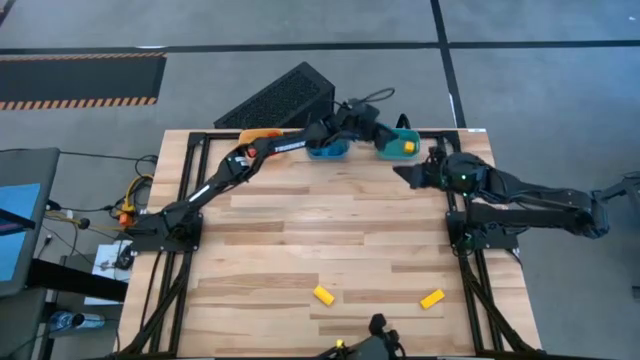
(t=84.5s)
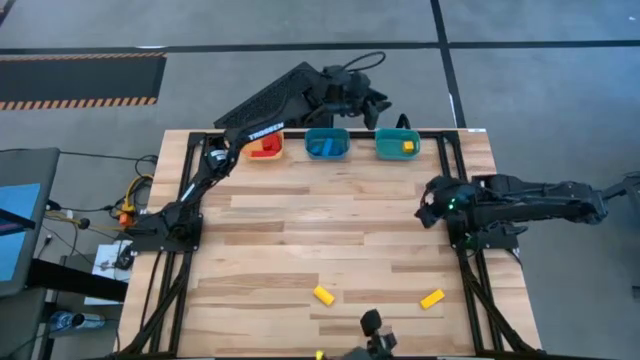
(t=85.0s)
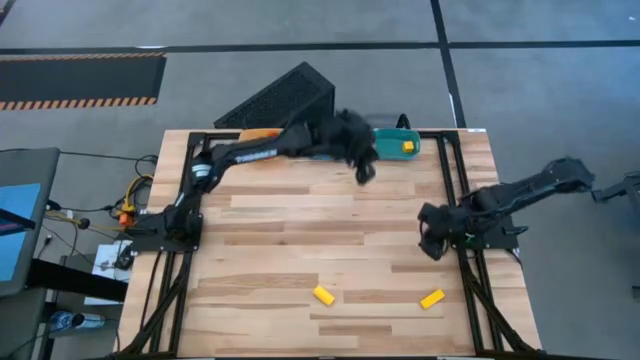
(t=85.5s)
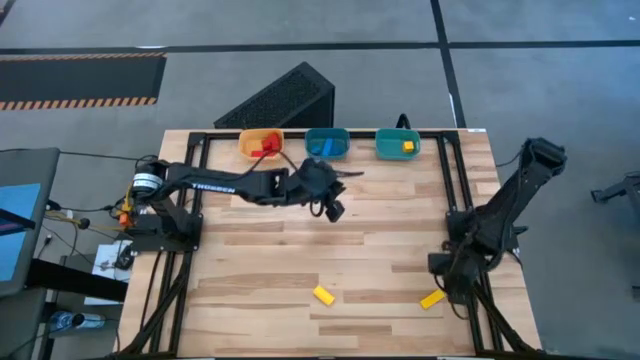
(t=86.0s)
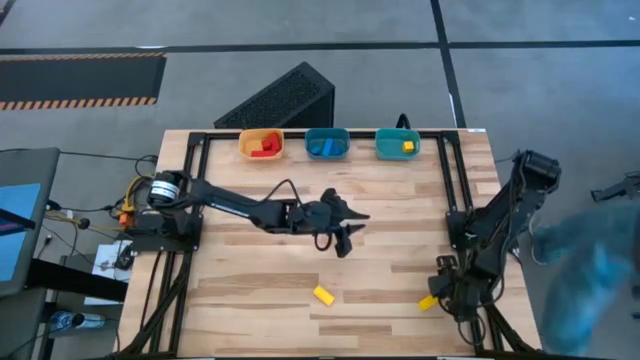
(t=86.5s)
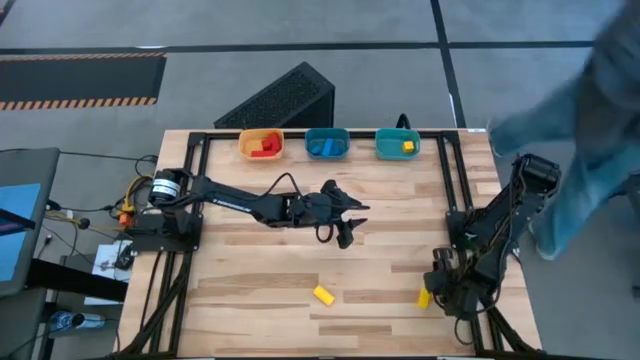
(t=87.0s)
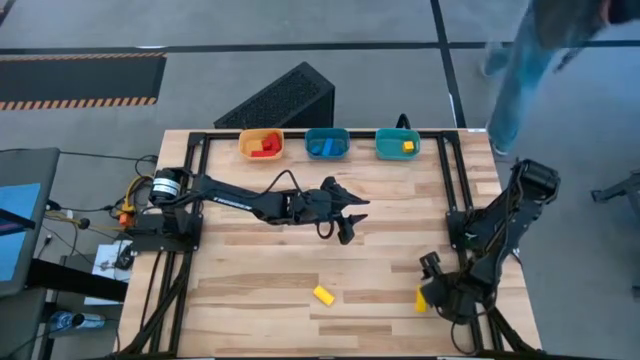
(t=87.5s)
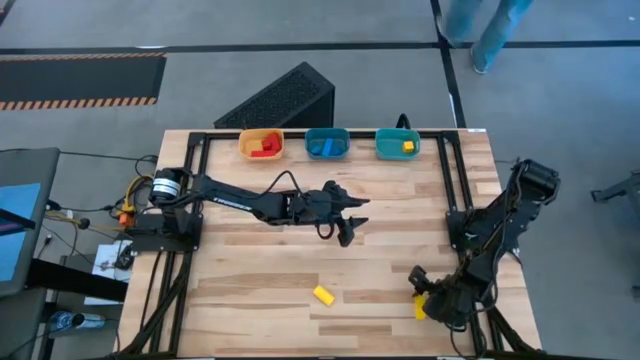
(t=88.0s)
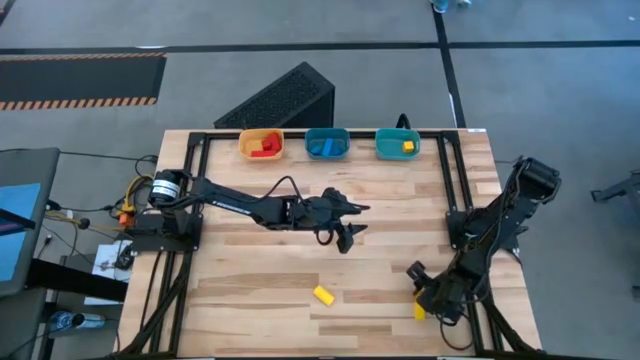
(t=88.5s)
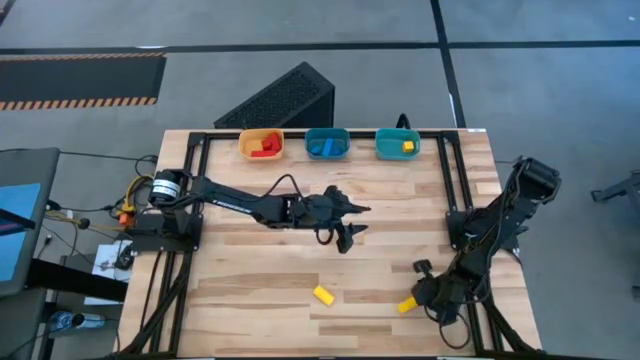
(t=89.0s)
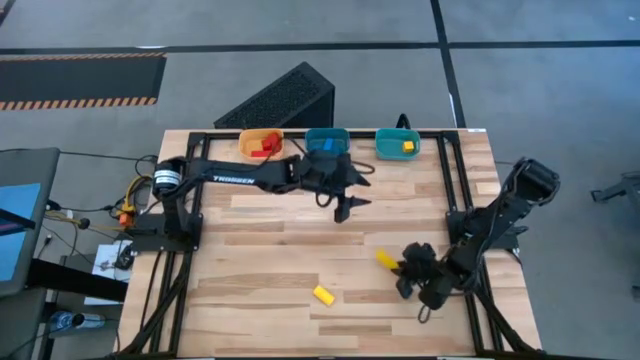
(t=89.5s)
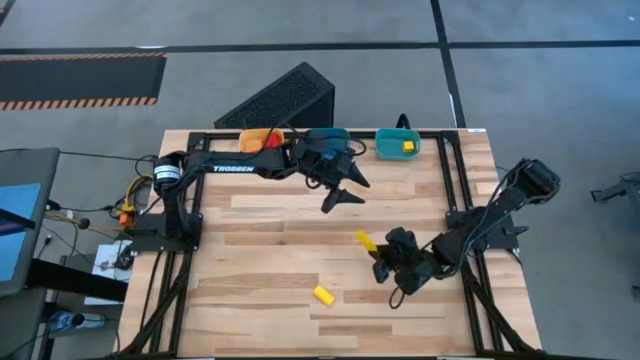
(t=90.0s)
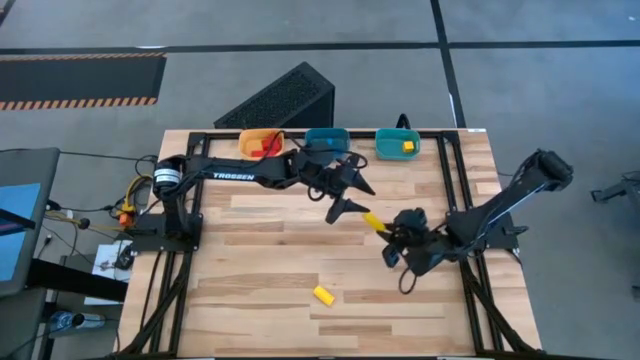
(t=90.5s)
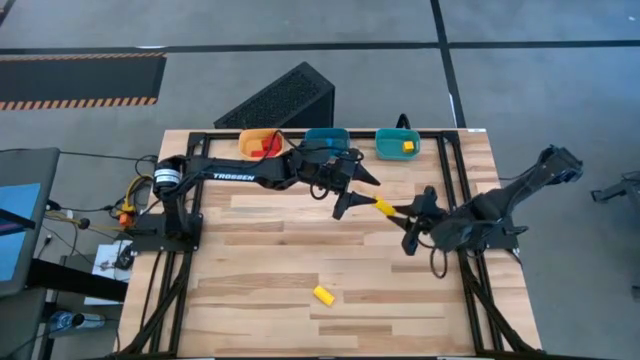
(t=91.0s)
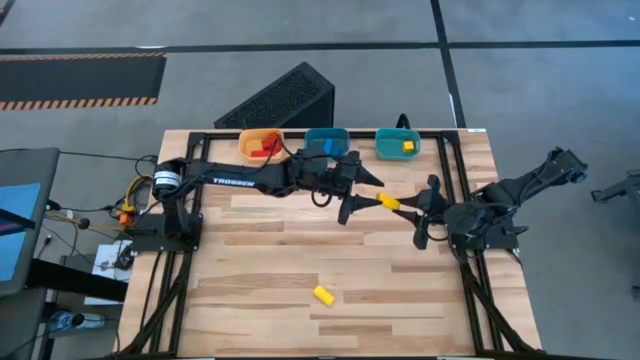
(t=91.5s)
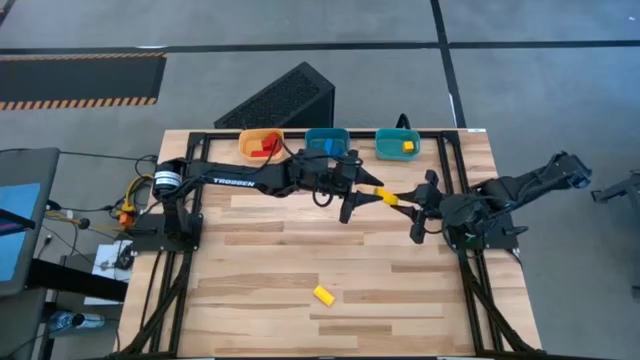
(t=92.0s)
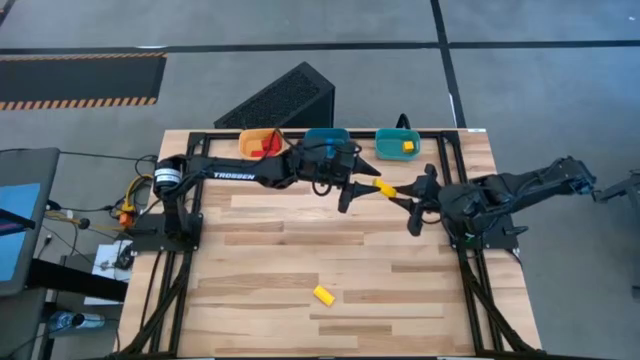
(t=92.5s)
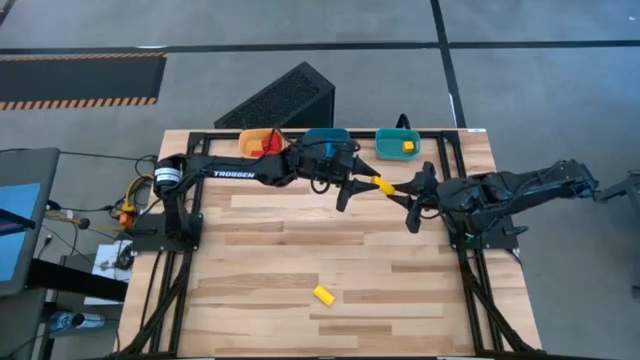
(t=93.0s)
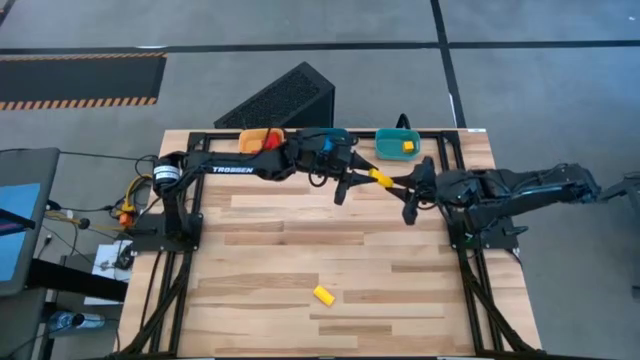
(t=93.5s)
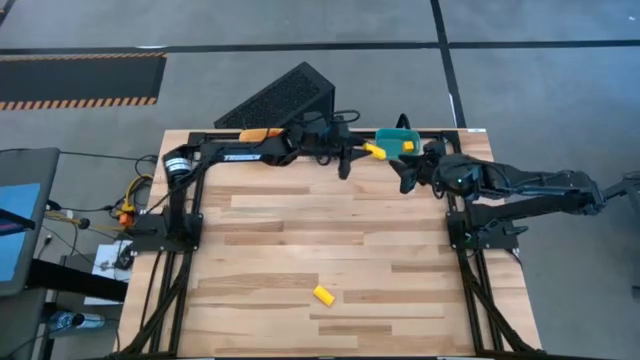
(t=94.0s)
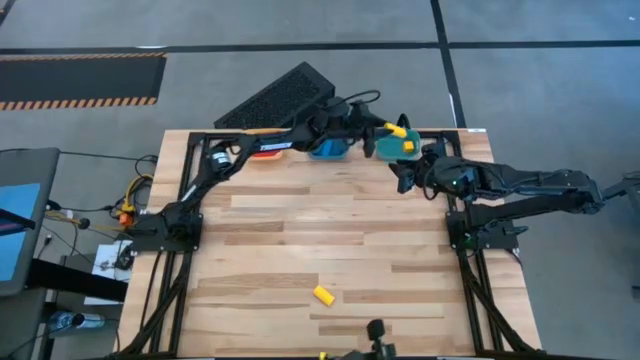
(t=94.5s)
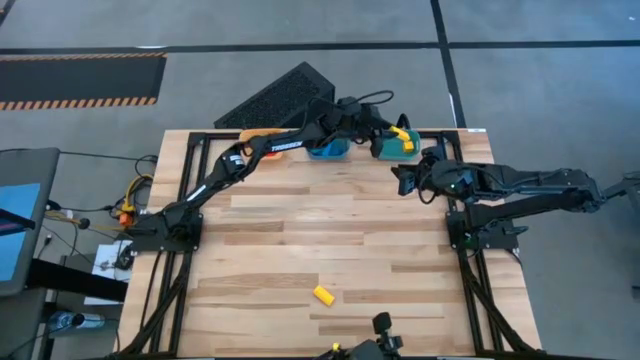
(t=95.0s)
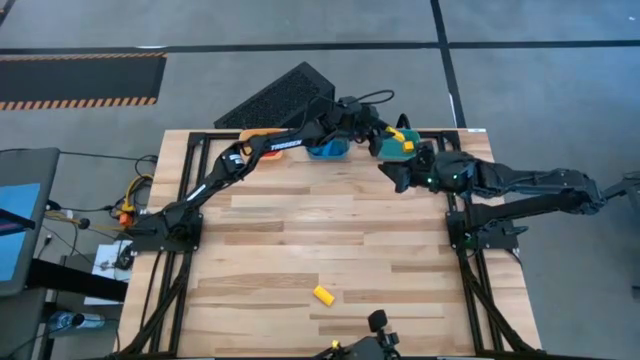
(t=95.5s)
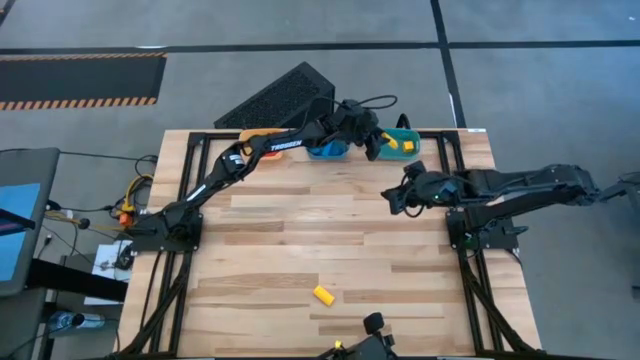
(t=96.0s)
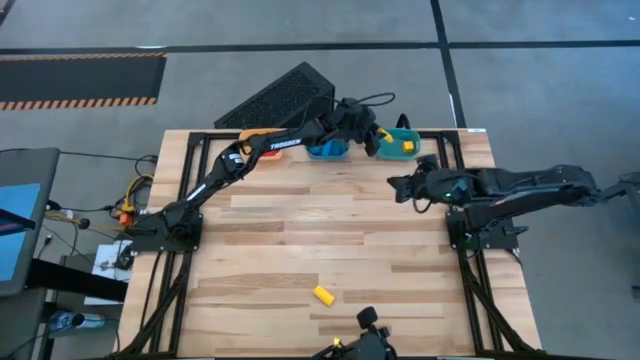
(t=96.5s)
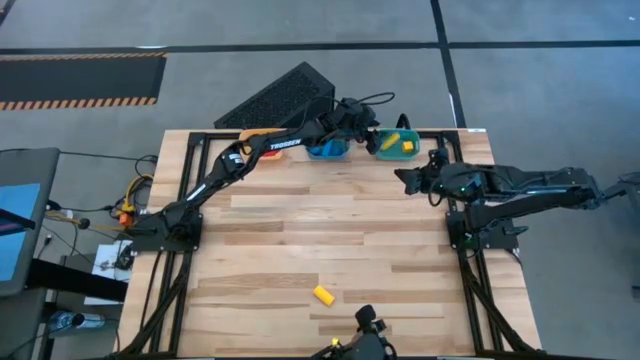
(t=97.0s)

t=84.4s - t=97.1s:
Task: Sort & place blocks by color
Put the right yellow block into the light green container

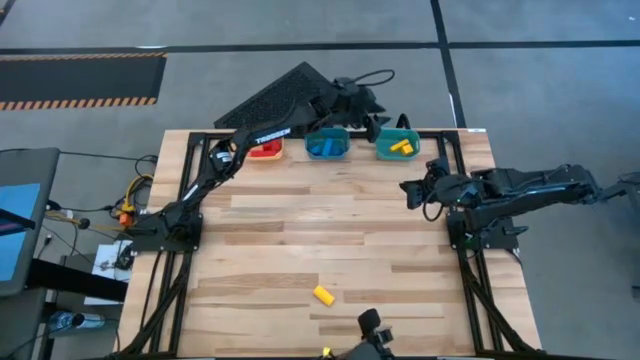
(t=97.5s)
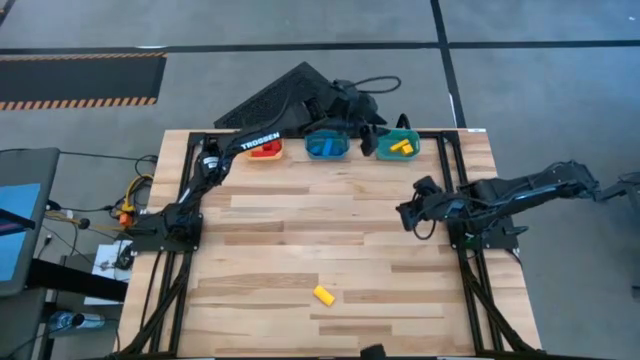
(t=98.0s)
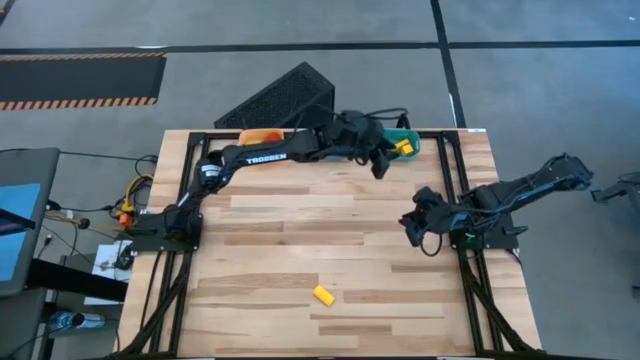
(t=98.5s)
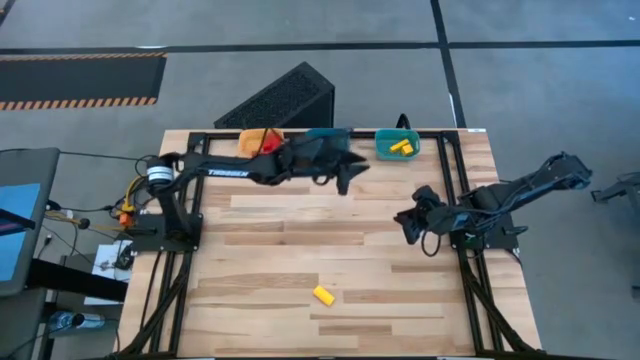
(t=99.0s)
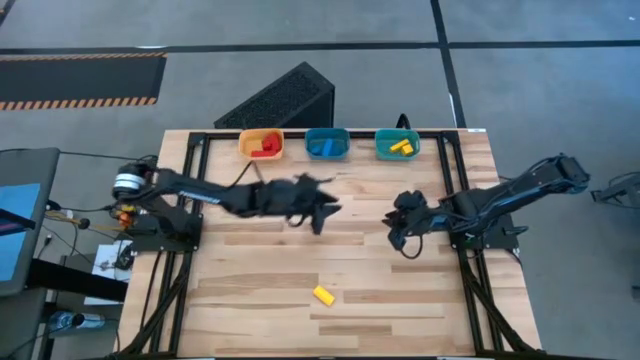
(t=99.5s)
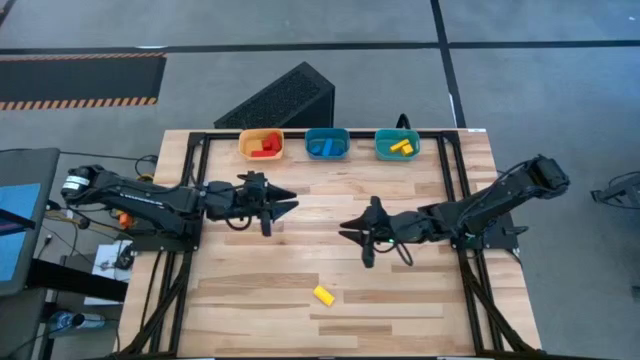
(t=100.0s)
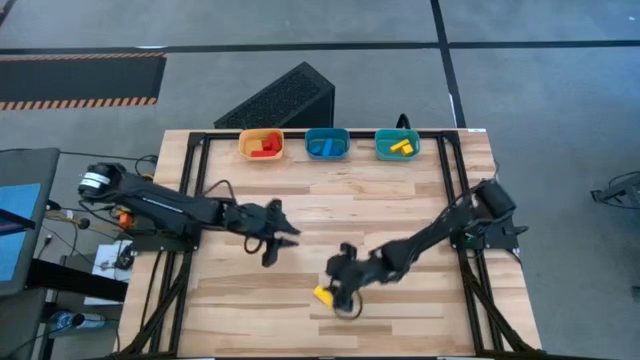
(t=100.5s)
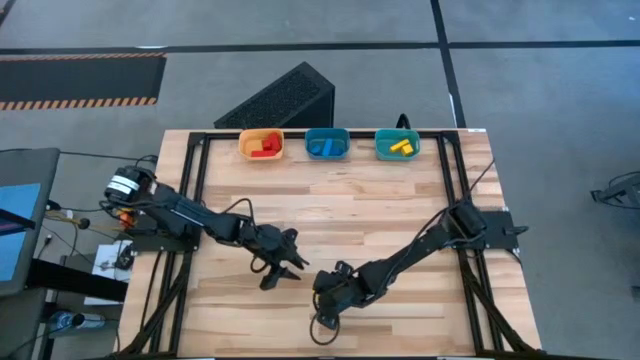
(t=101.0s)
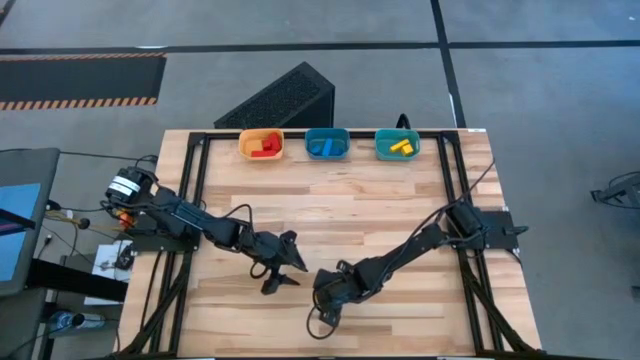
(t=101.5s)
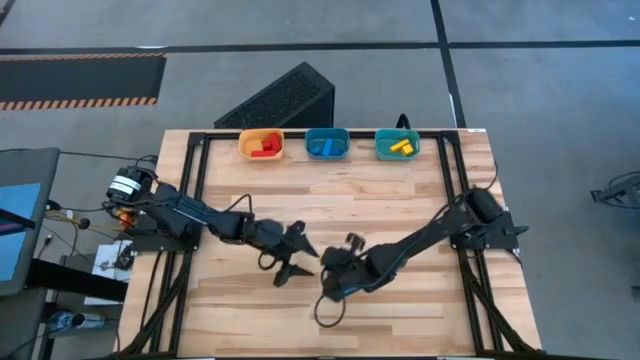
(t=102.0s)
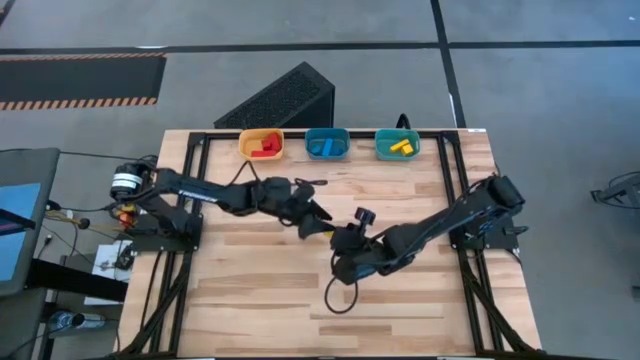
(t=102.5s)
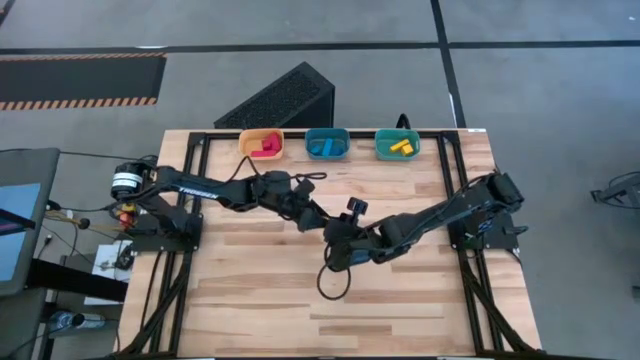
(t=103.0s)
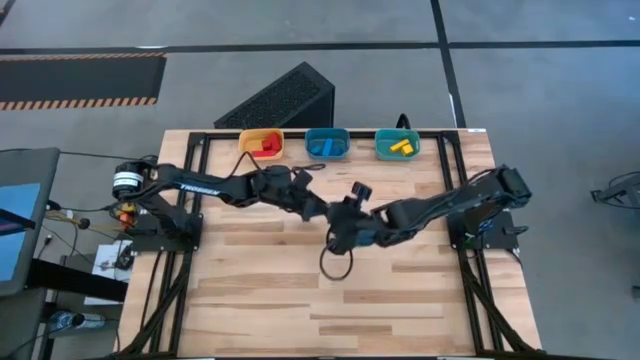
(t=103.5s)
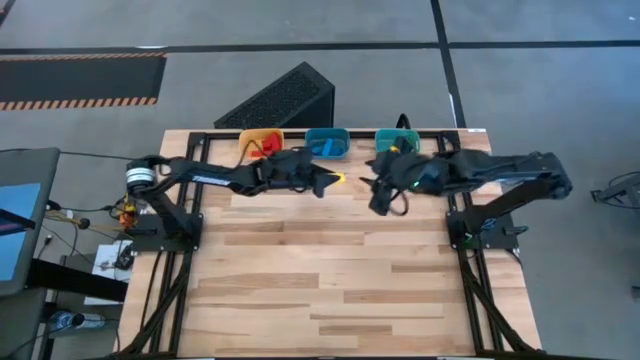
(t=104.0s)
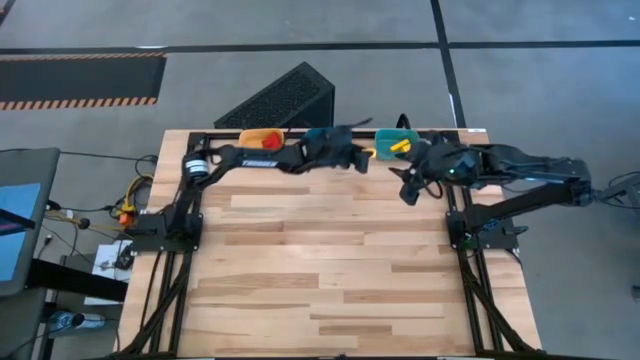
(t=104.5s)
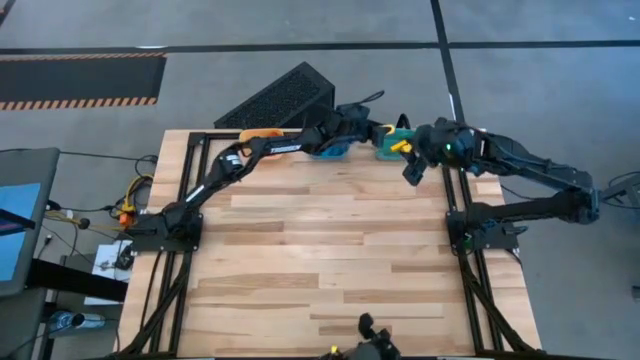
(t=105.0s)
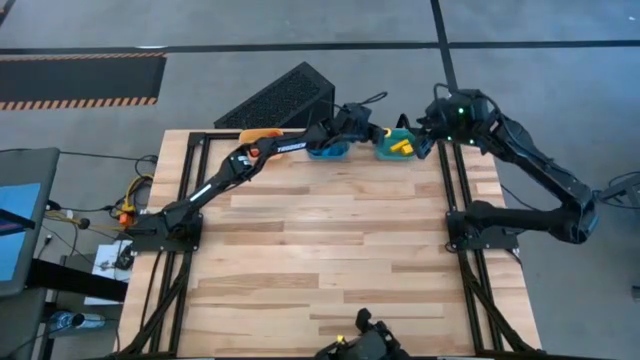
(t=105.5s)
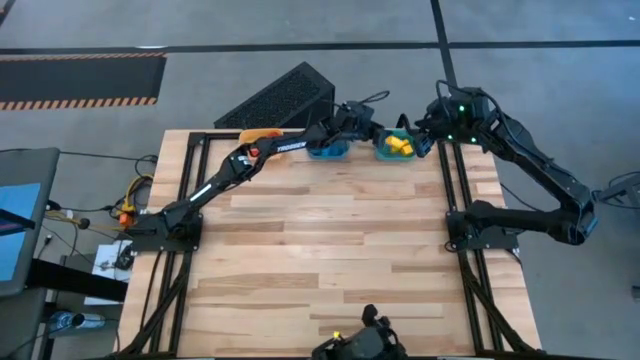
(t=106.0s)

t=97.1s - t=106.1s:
Put the yellow block into the light green container
